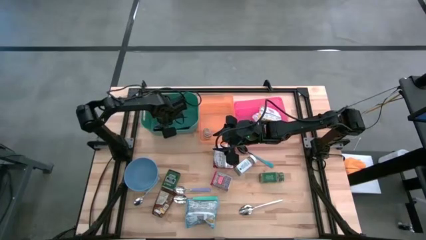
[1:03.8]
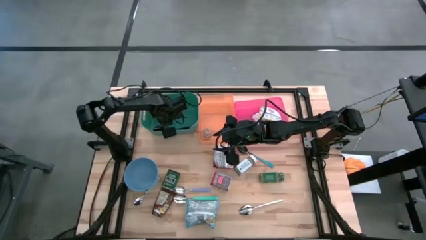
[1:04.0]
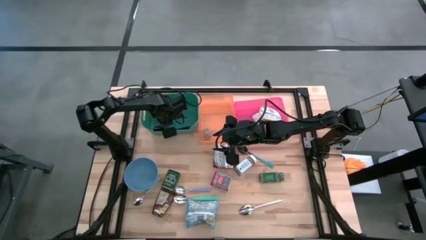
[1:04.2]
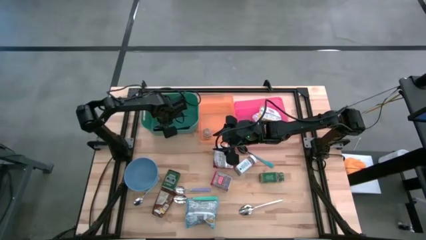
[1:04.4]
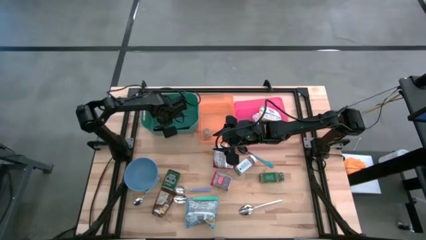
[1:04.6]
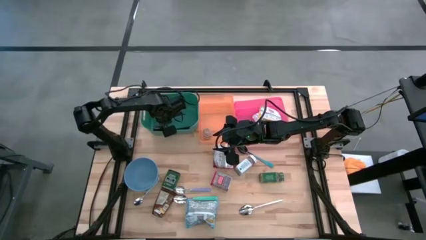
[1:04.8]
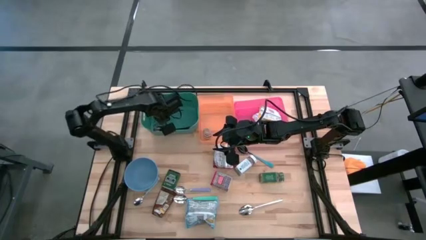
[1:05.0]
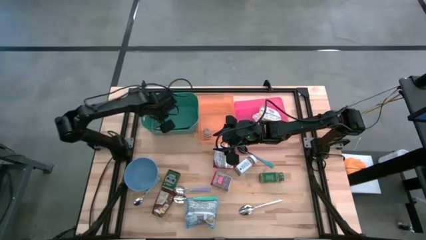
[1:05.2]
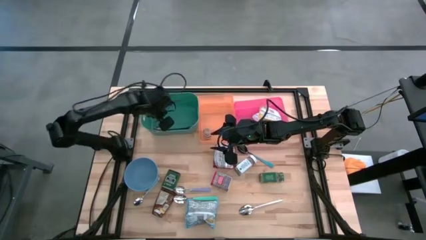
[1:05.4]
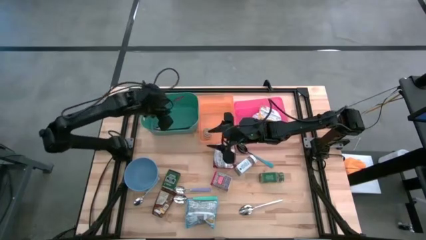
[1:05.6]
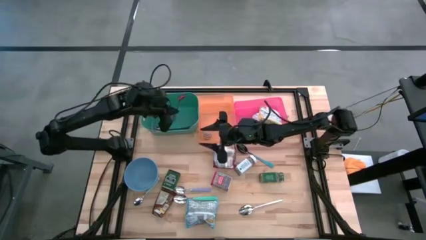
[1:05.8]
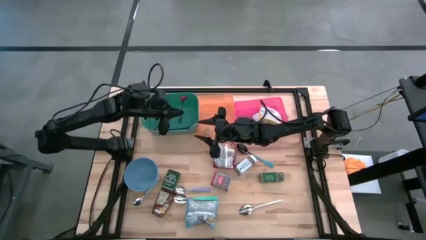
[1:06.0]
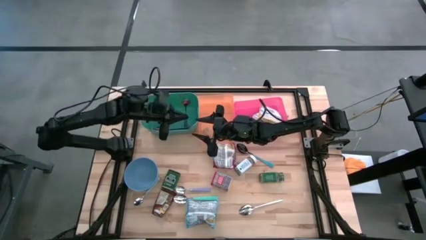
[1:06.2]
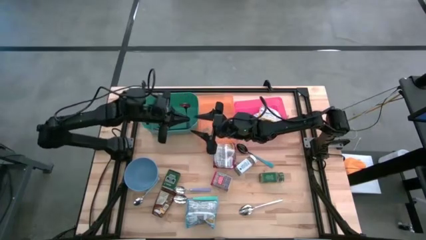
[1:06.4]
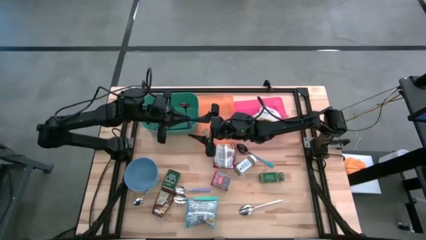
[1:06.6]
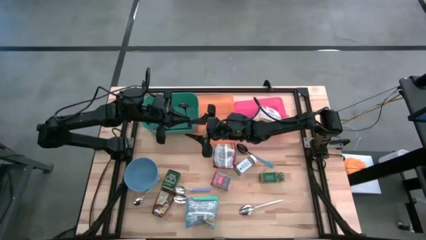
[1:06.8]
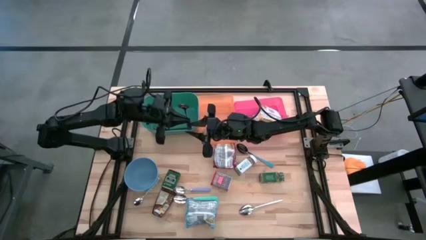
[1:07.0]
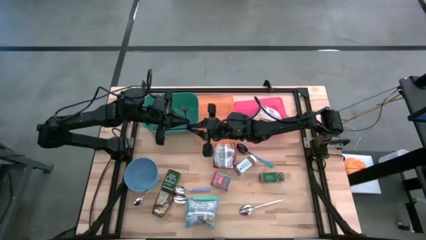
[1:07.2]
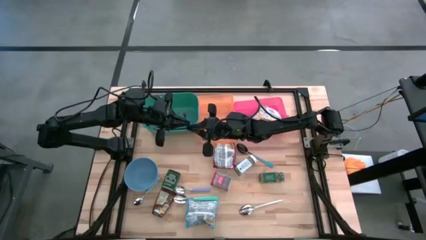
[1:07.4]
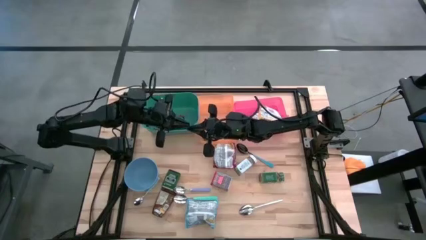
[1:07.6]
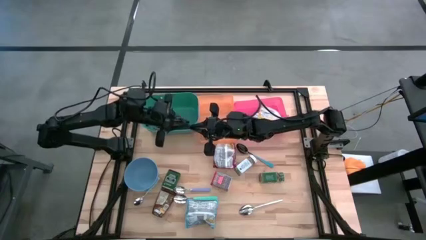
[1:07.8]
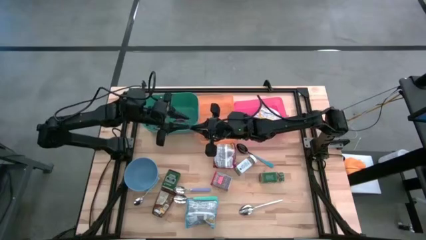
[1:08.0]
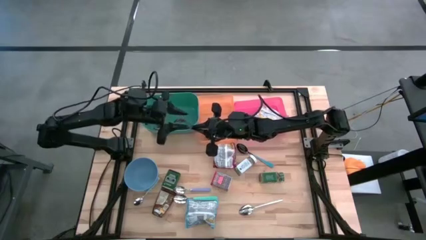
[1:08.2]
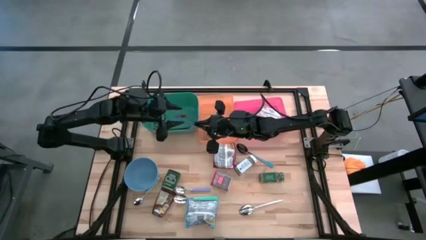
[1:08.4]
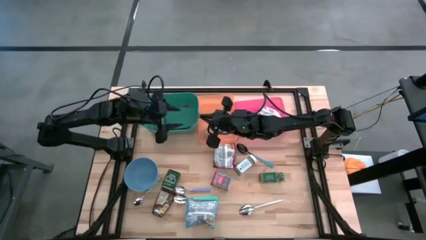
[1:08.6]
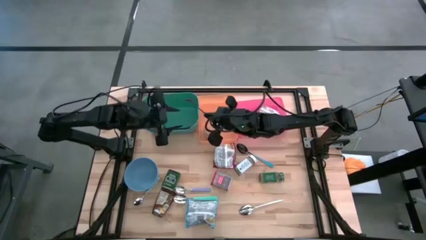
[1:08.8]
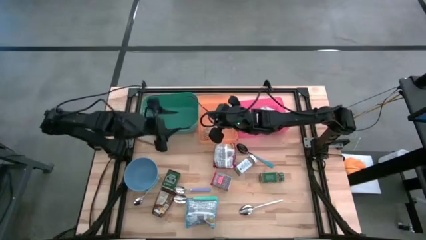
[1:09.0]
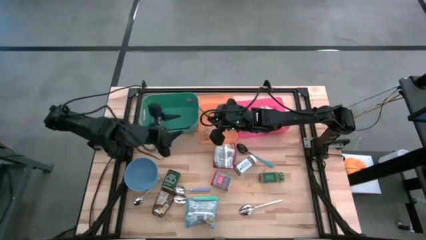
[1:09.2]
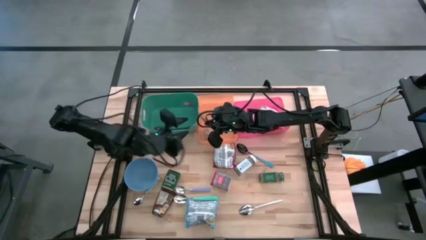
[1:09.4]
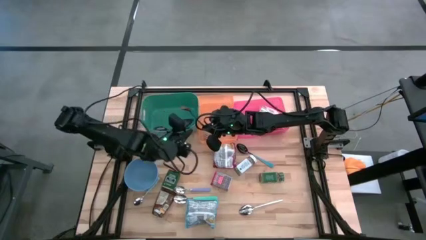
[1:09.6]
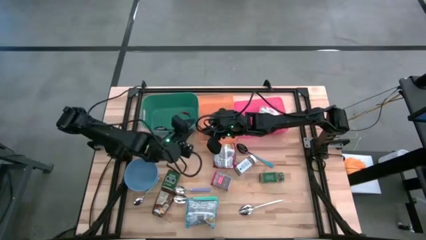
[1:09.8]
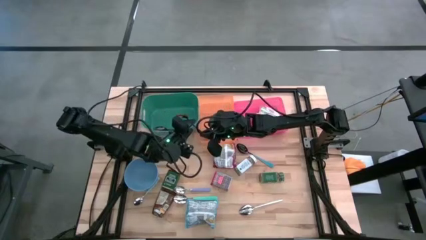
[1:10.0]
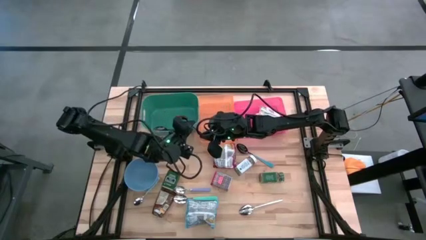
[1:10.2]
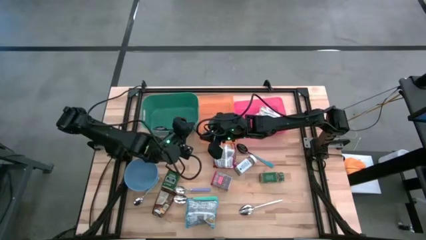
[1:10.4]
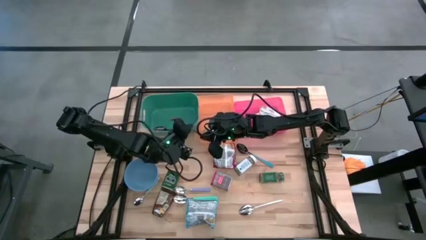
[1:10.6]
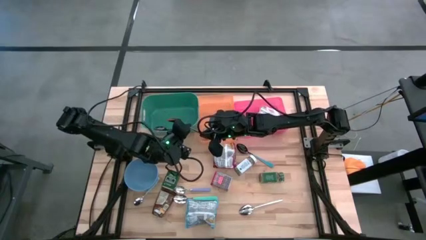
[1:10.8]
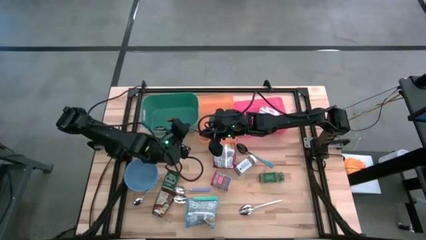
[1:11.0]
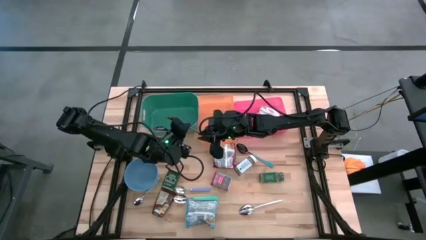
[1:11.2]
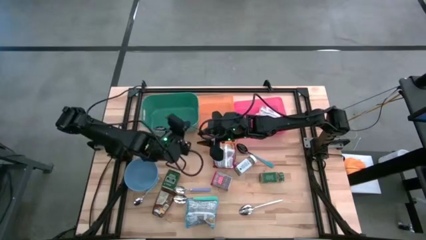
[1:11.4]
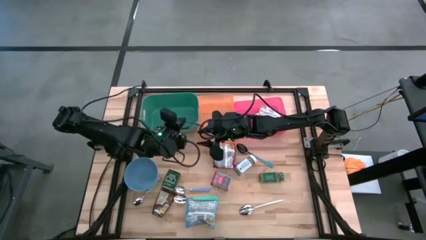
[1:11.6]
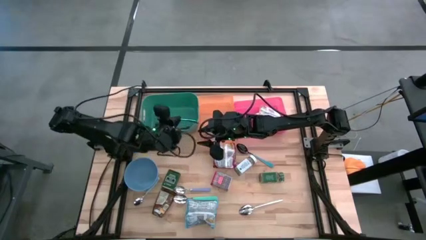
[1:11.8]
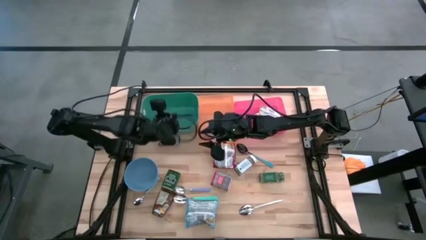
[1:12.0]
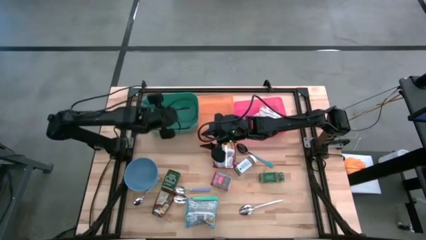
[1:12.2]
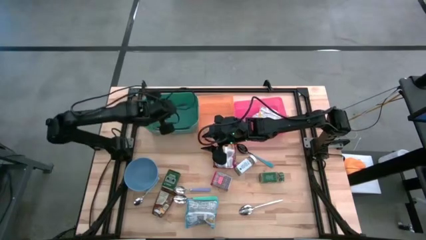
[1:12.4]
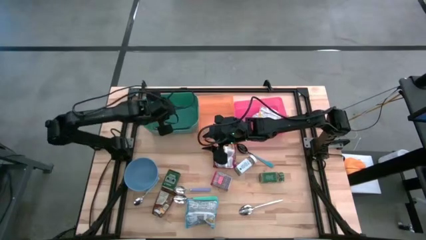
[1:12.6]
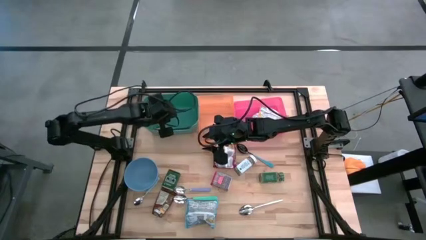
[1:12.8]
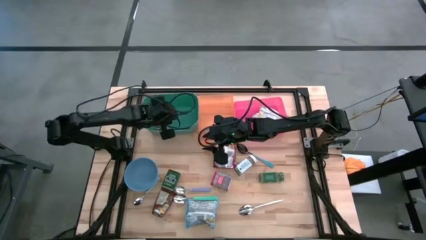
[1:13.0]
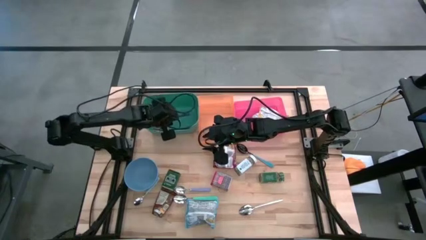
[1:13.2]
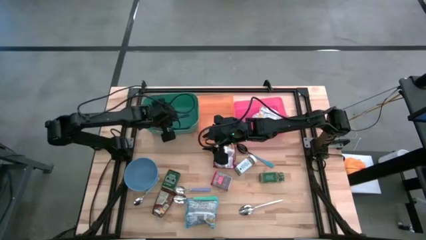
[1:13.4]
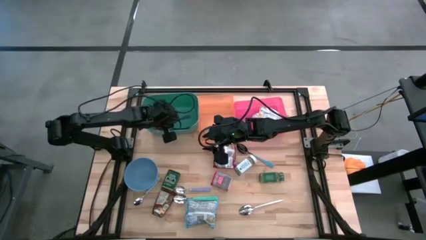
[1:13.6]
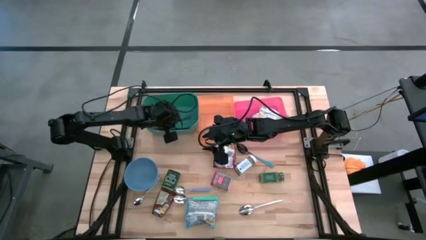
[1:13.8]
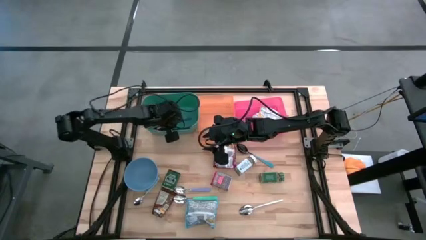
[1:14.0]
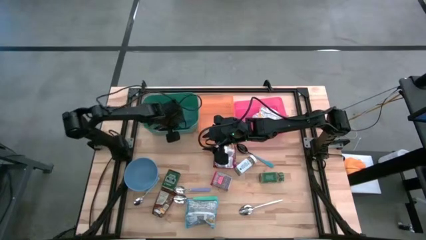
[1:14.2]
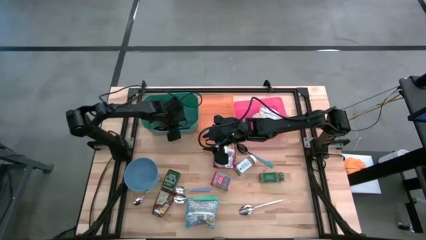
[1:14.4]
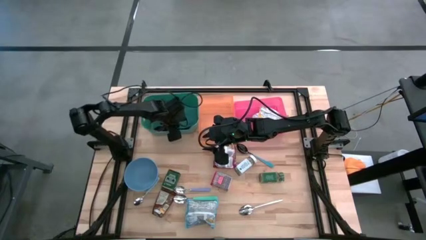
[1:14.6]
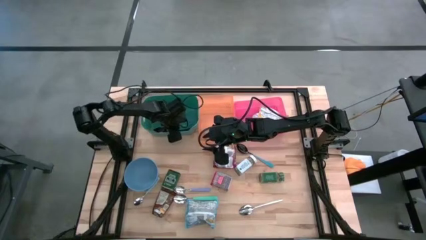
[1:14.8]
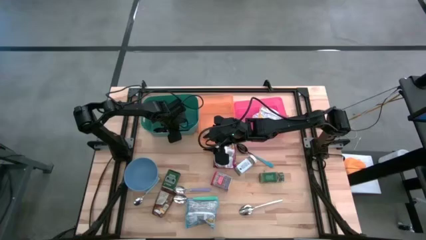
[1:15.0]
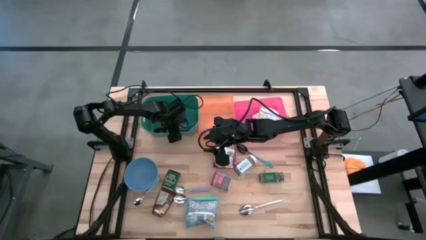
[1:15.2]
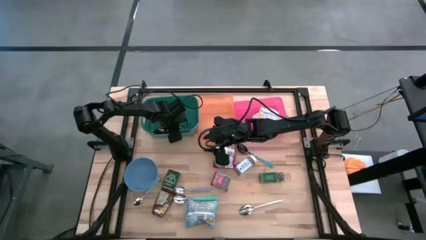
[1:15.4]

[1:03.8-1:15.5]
Put the blue spoon into the green bin

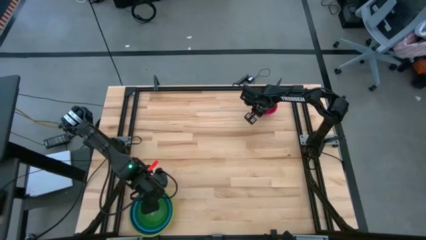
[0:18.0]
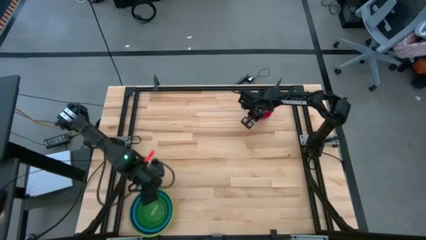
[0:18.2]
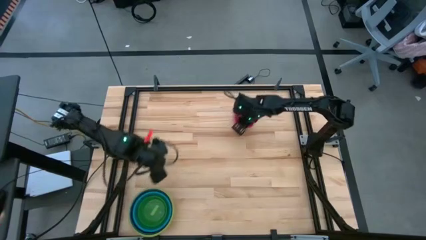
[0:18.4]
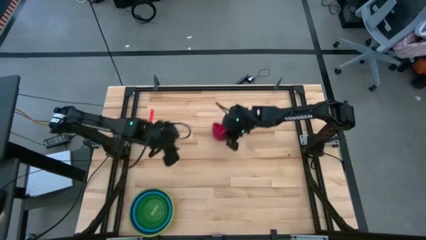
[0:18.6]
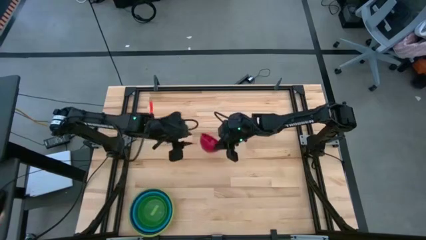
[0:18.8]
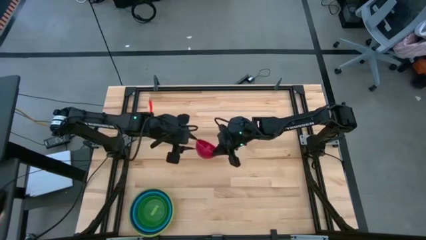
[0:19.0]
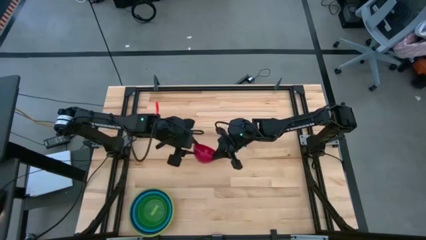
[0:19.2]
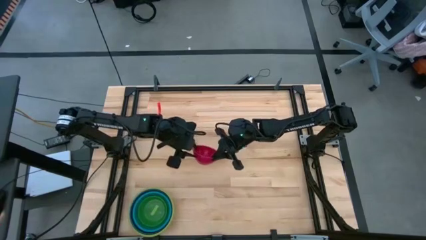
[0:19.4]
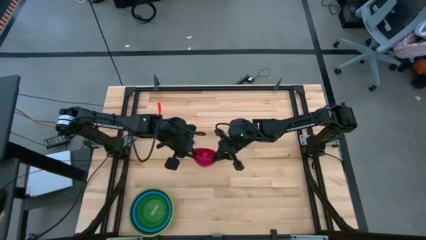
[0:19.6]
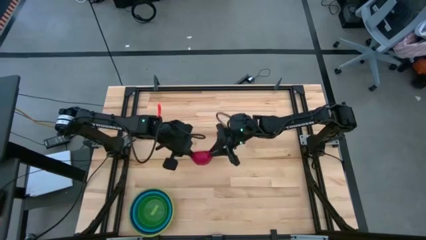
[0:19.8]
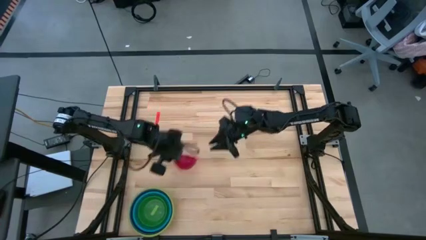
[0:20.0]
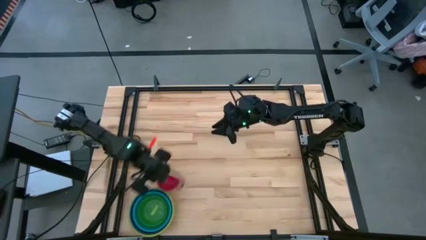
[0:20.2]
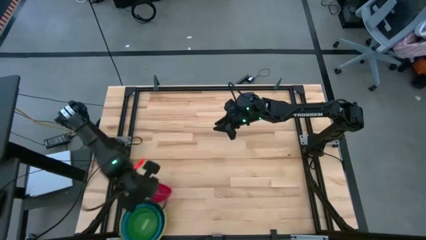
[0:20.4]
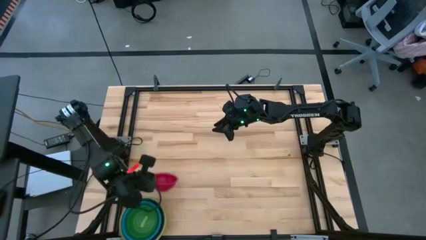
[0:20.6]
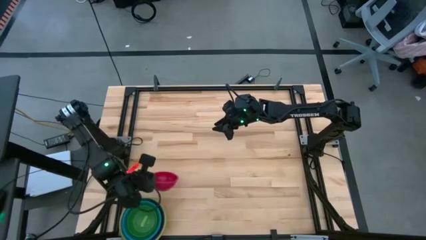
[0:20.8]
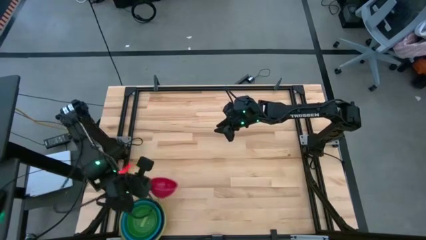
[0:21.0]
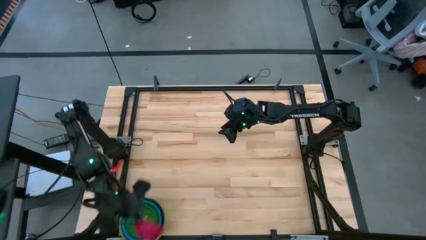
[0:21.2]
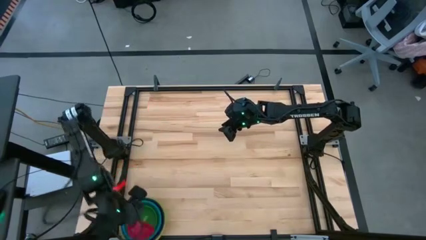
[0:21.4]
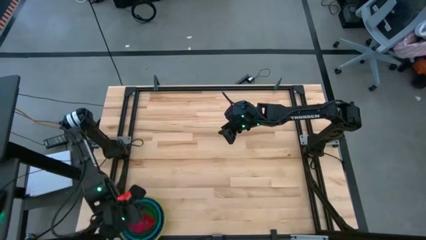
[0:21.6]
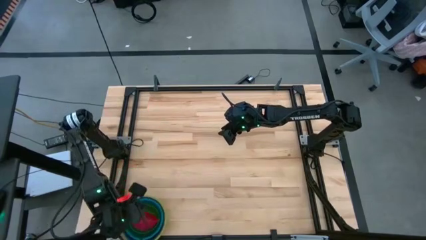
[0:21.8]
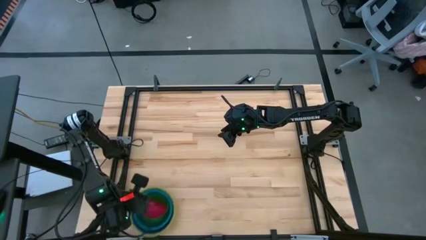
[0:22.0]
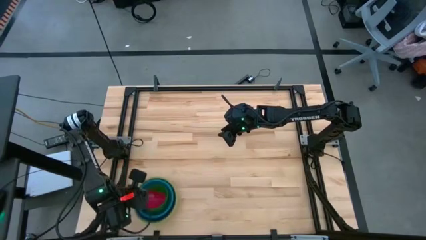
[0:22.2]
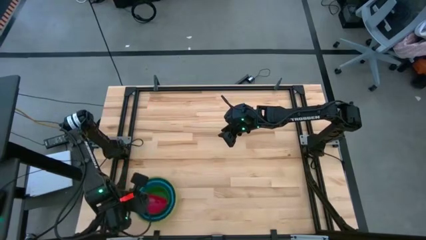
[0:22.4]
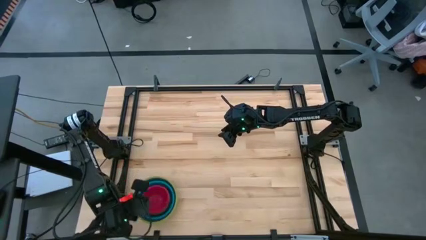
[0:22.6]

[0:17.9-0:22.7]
Stack the red bowl on top of the light green bowl
